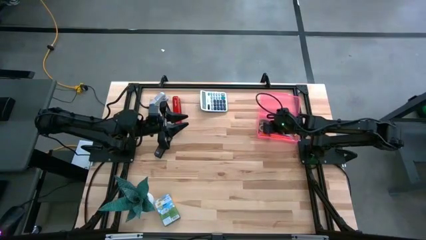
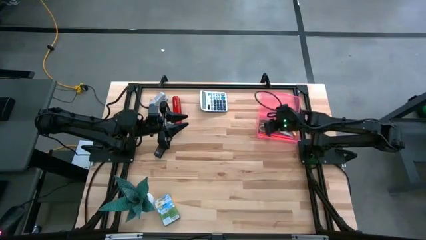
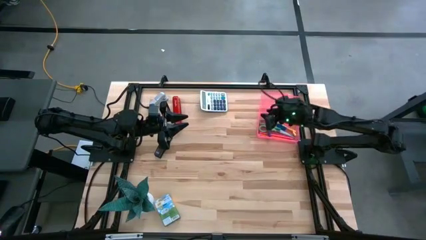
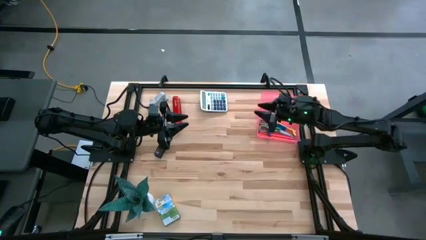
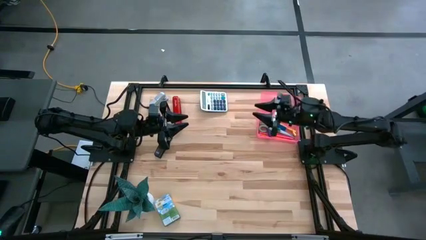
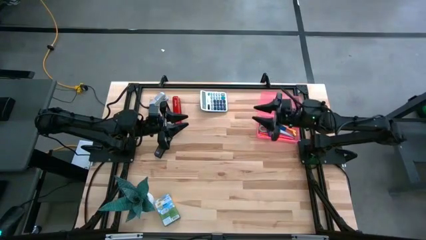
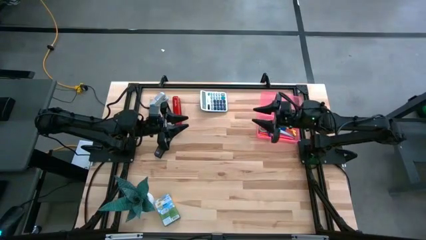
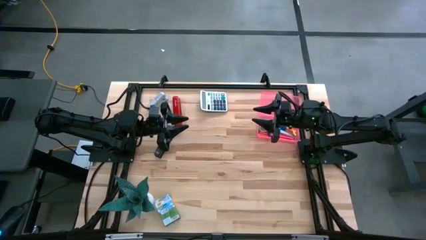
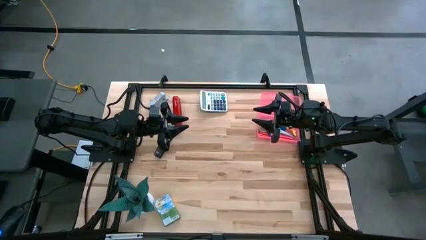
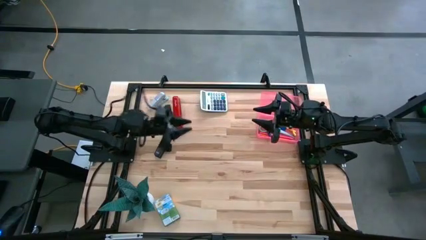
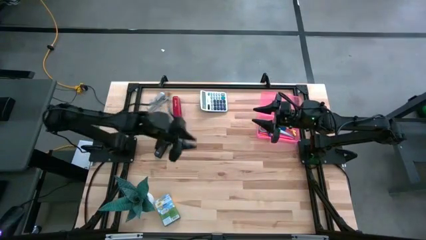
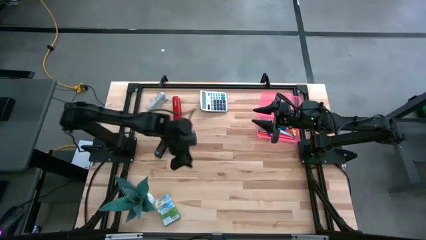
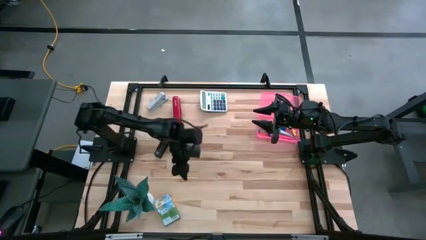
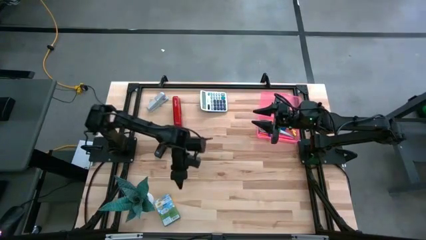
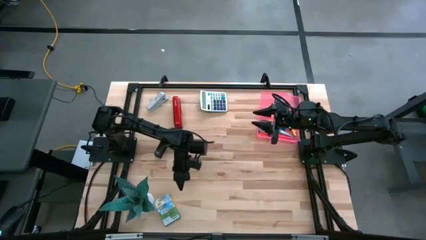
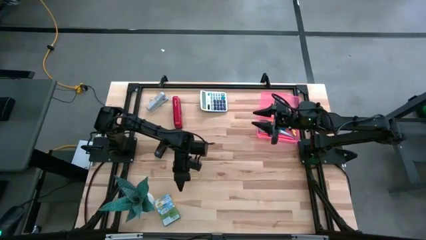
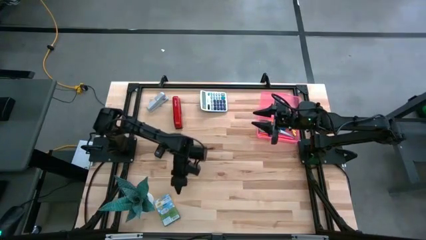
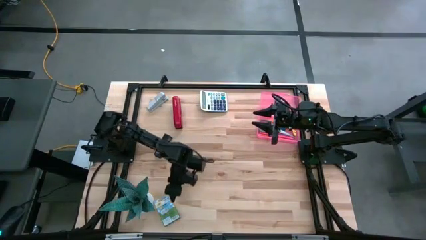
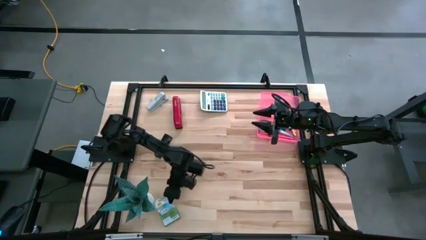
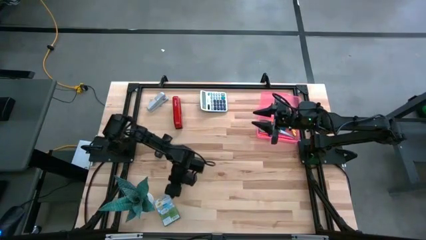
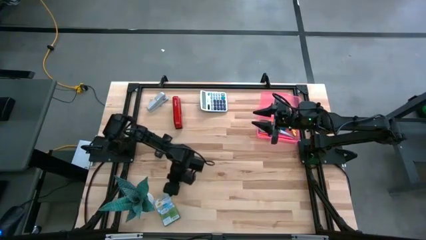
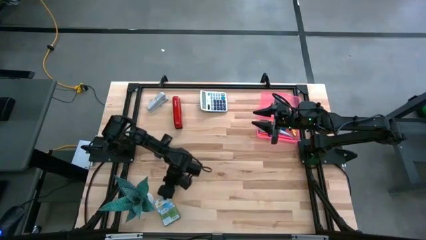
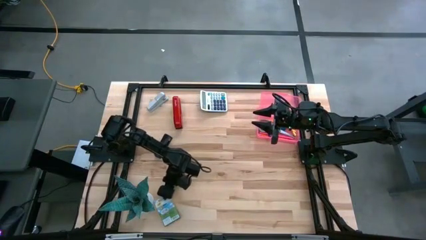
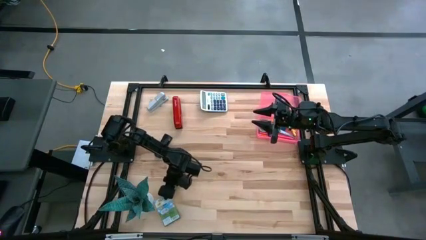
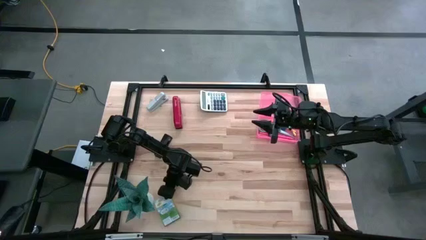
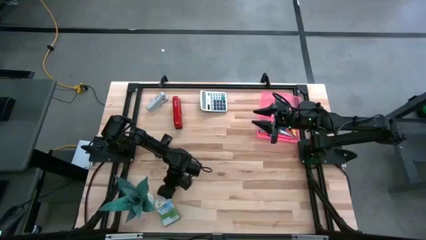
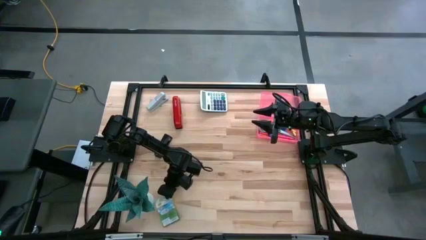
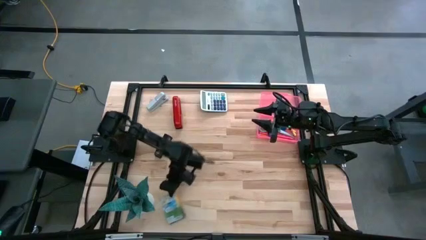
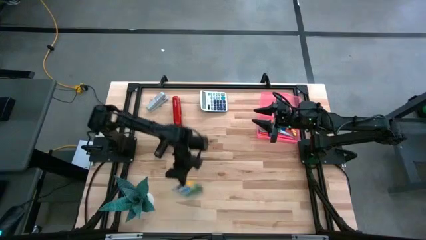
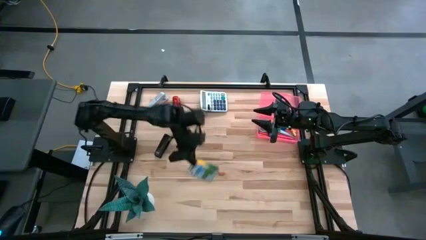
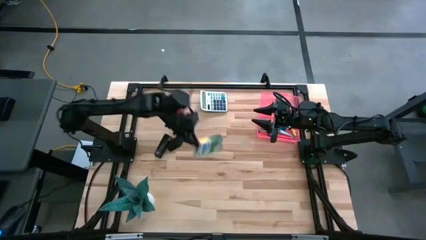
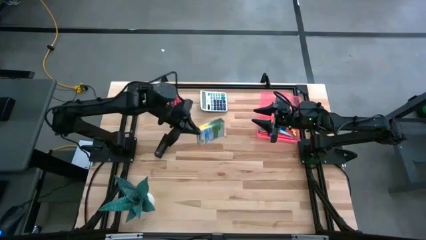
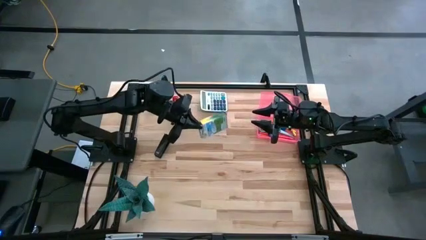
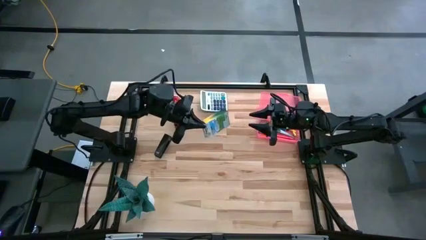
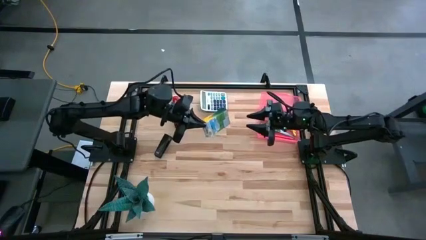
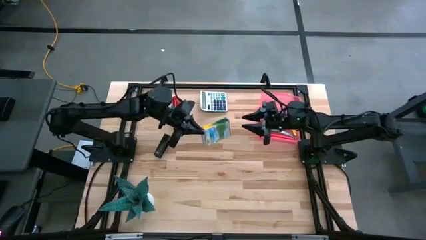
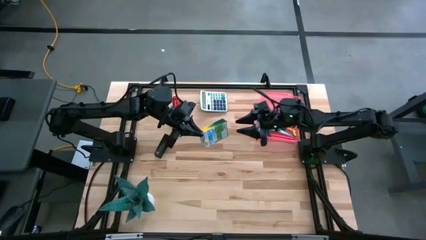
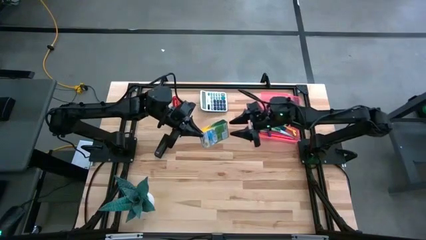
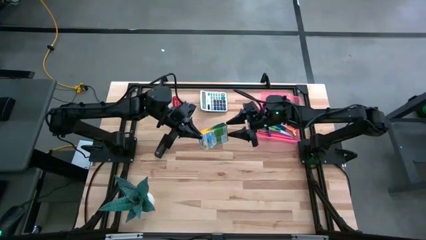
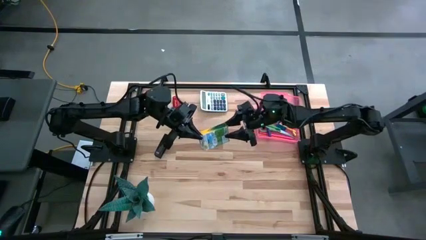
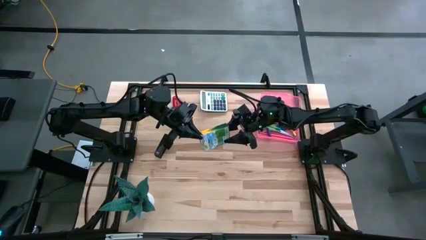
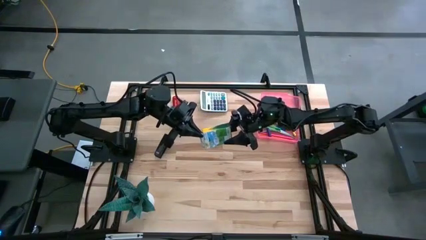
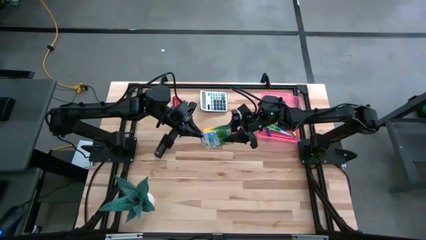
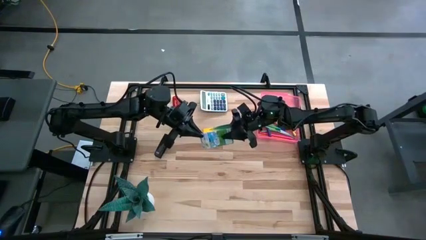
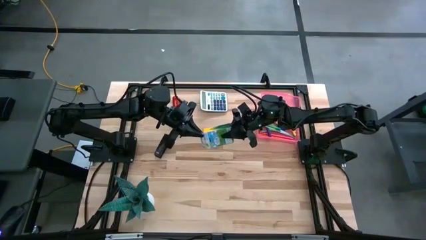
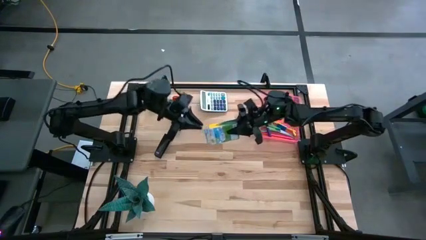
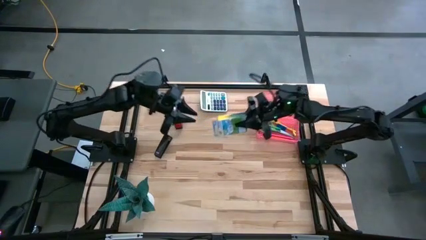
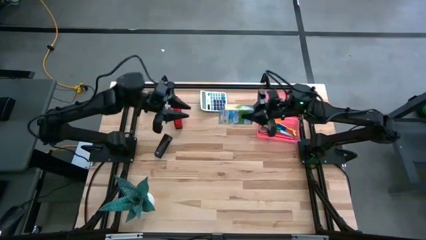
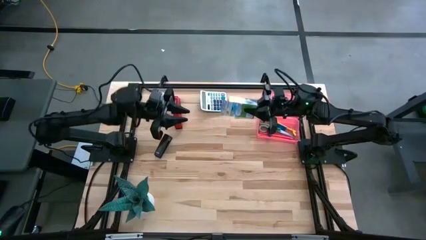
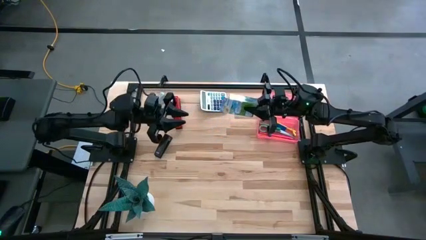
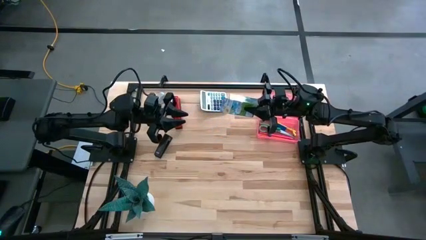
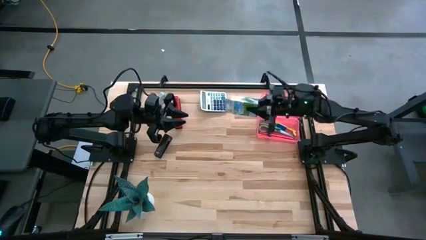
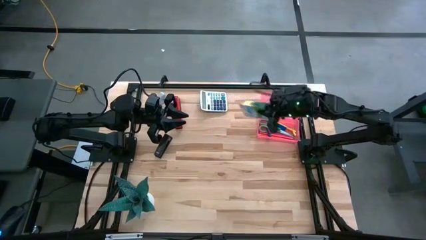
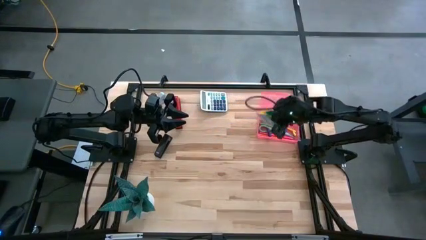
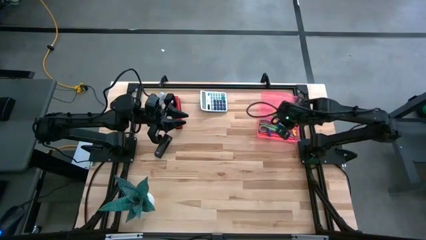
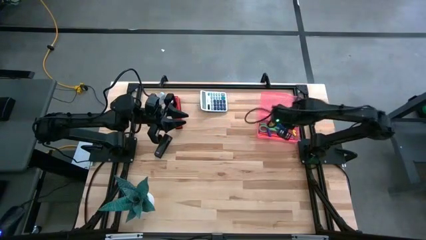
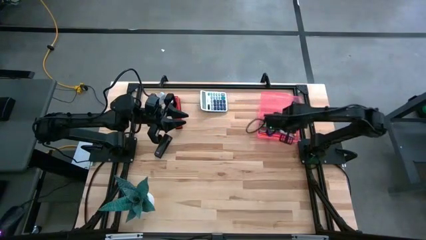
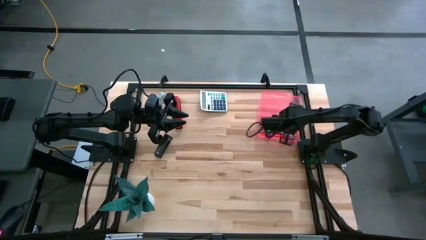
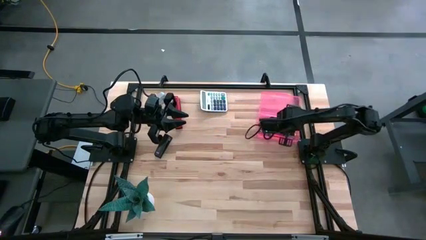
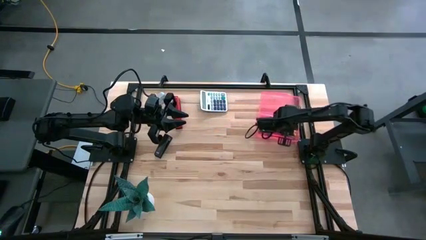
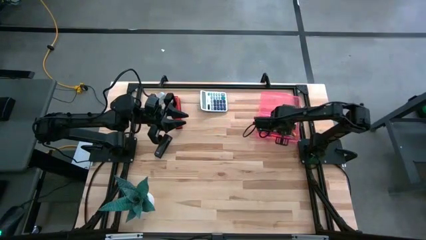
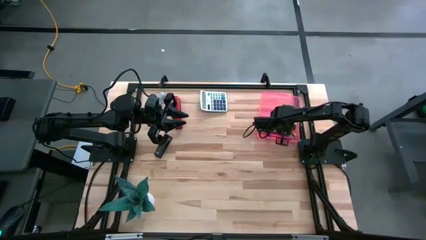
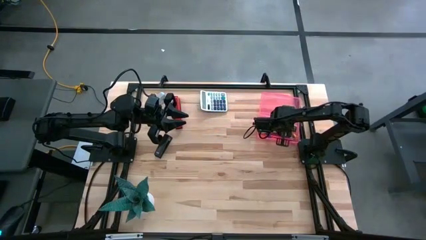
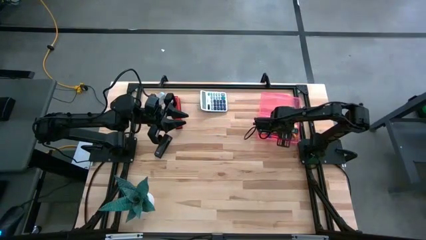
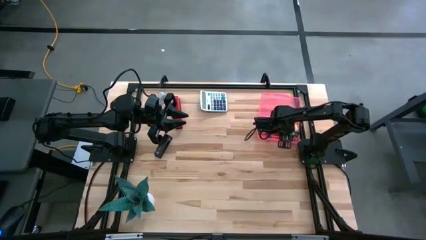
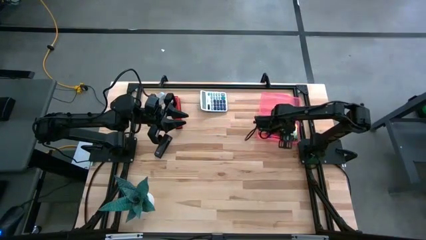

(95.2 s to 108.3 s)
Task: Pack school essentials
Put the yellow crayon box into the pink supply box
